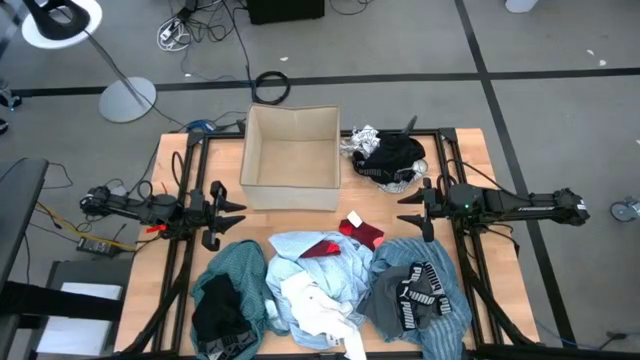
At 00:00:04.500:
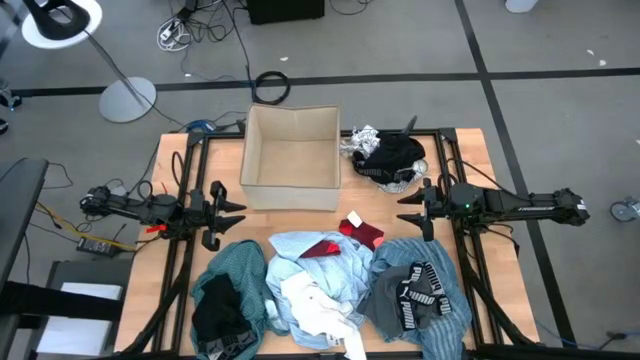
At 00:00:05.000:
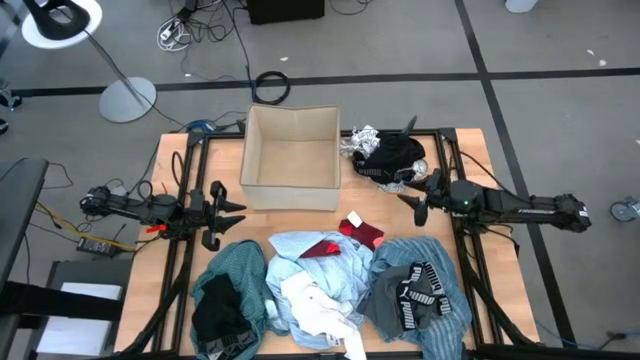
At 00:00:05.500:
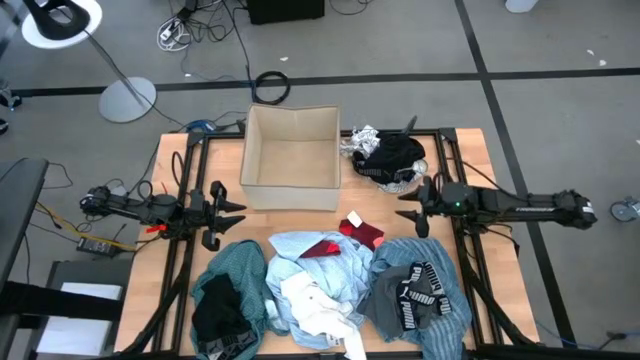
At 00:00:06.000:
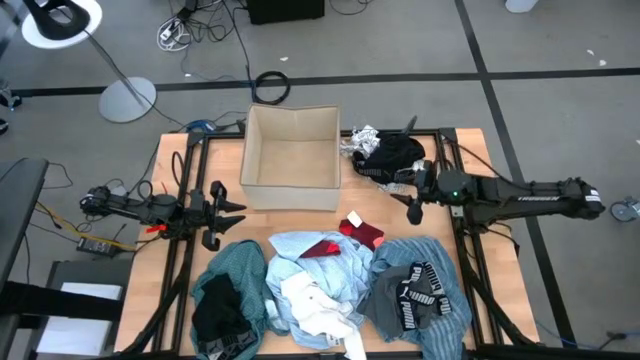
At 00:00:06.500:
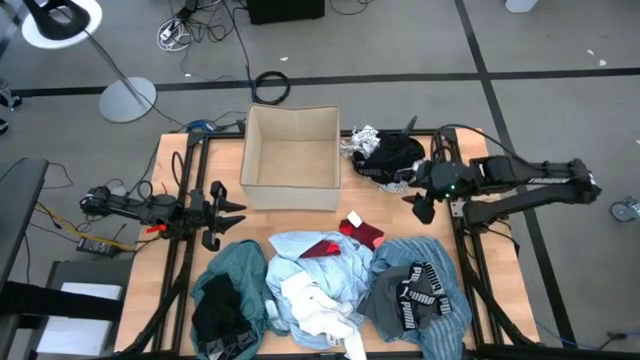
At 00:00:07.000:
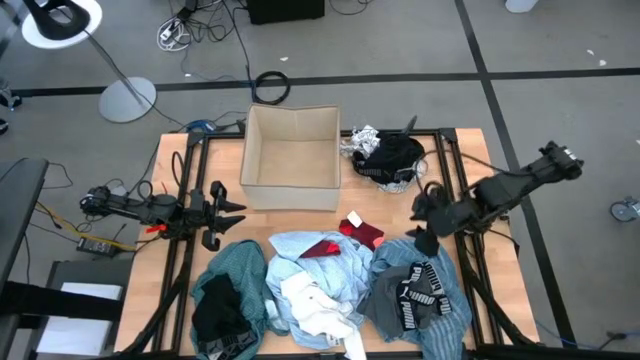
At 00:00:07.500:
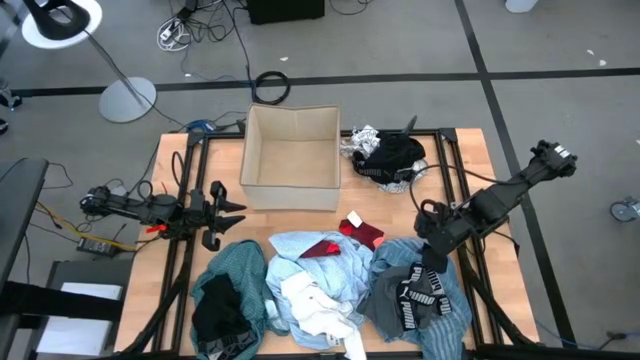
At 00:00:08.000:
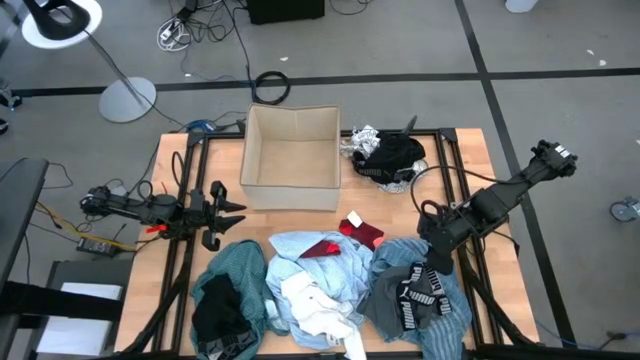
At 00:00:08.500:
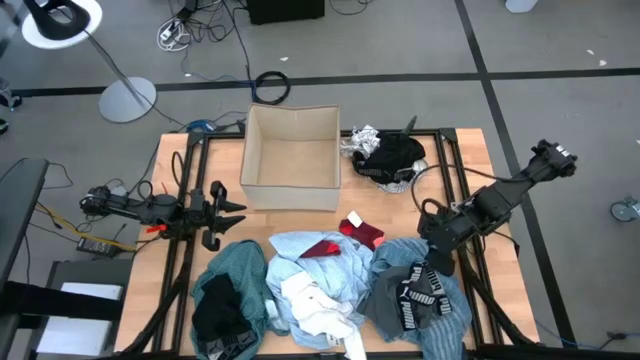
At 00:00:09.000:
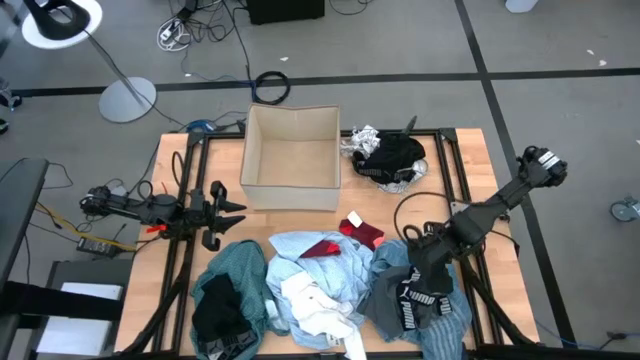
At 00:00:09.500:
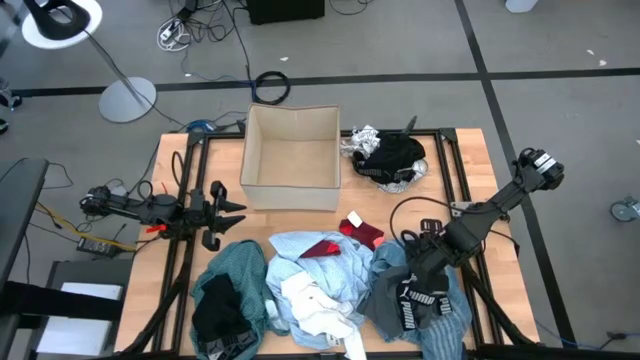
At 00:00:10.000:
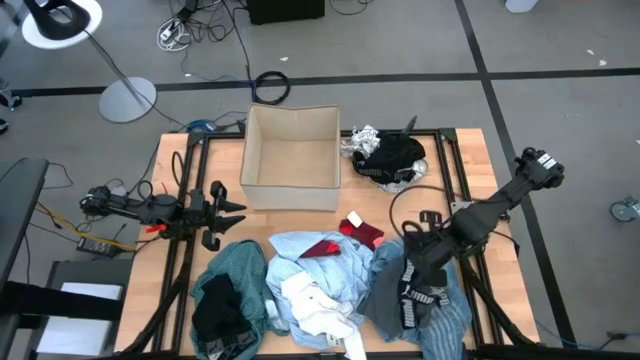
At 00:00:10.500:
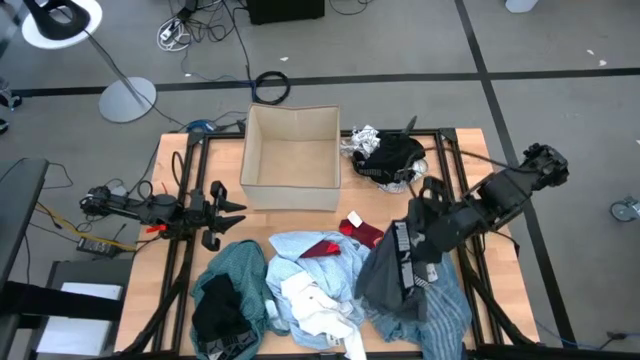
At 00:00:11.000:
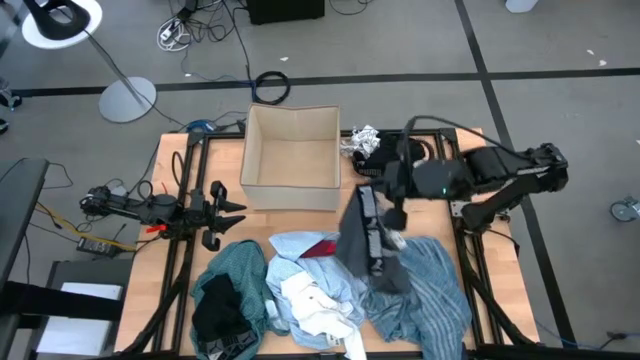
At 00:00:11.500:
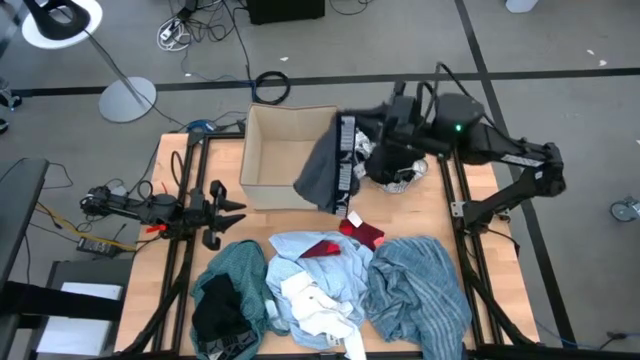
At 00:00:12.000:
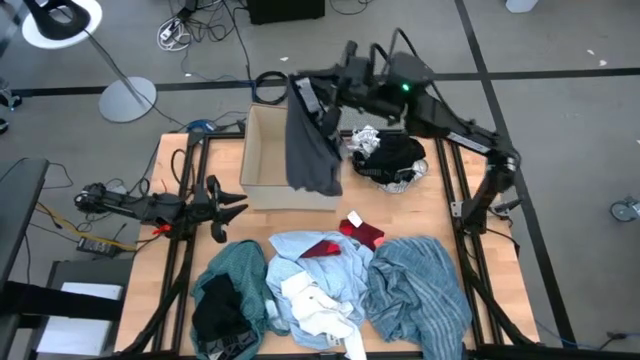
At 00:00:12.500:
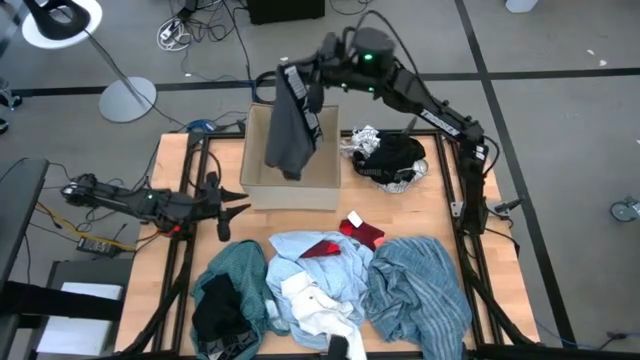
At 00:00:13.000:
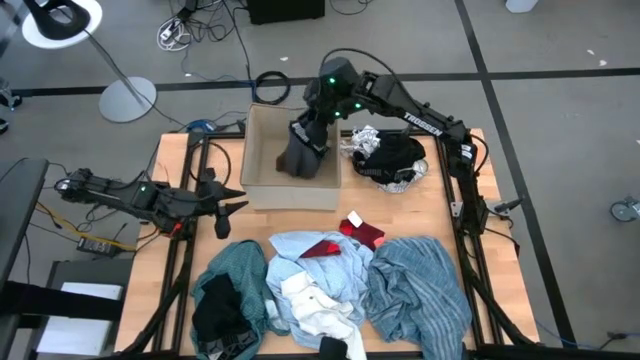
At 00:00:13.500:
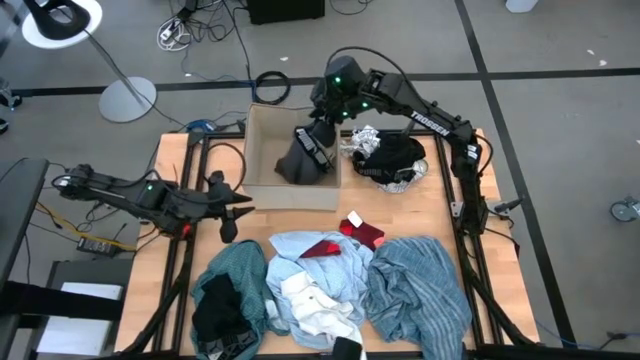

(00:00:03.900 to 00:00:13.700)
Task: Sort clothes
Put the gray boxers into the laundry organizer

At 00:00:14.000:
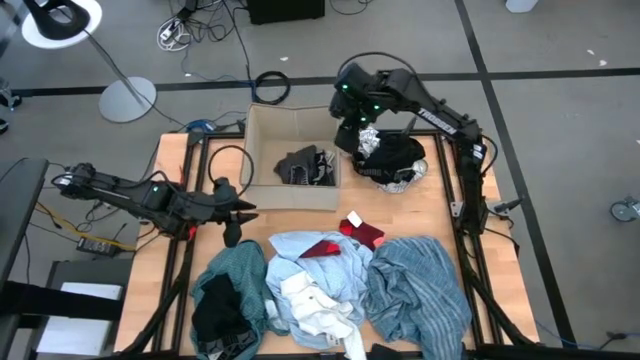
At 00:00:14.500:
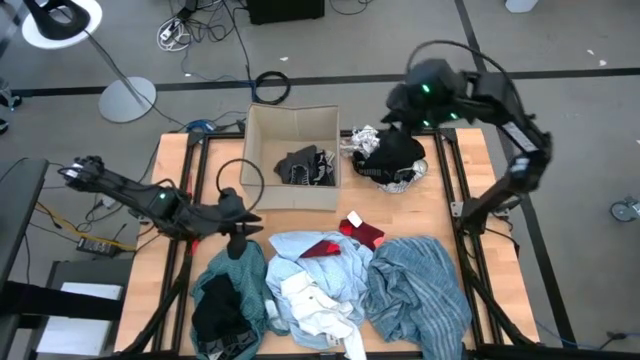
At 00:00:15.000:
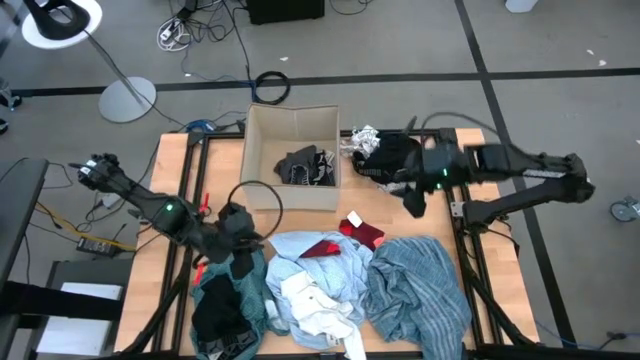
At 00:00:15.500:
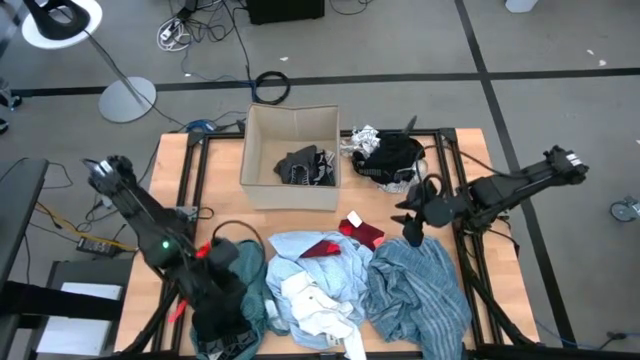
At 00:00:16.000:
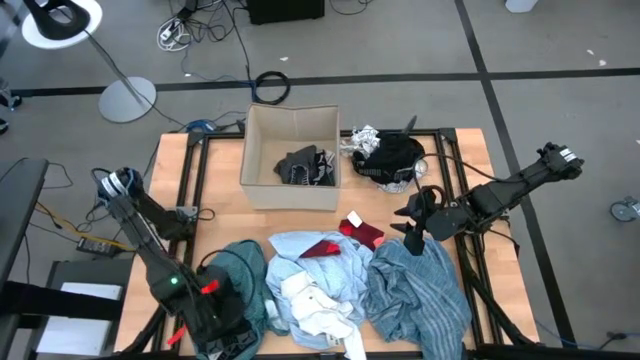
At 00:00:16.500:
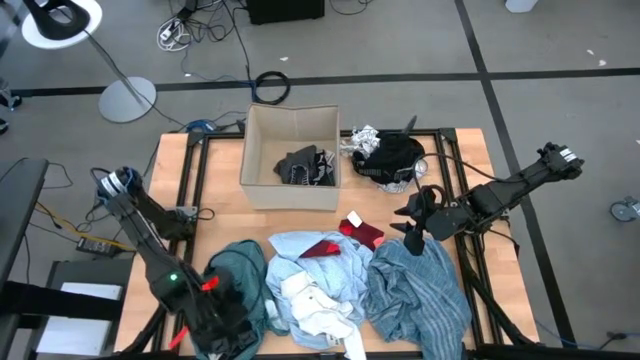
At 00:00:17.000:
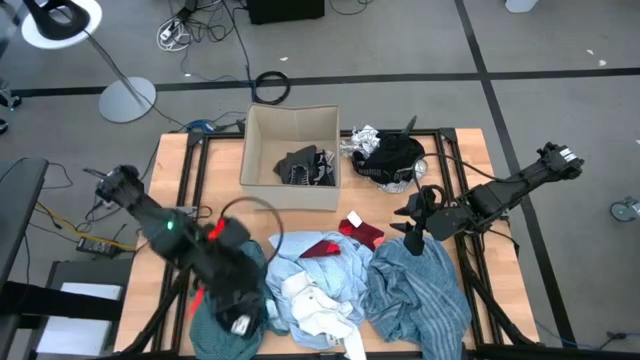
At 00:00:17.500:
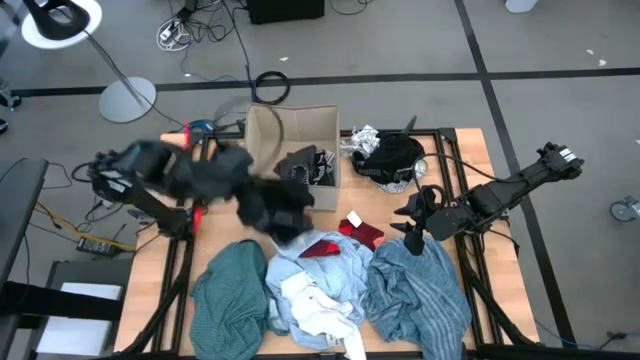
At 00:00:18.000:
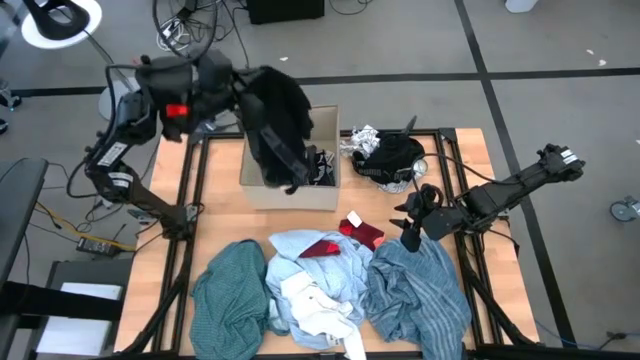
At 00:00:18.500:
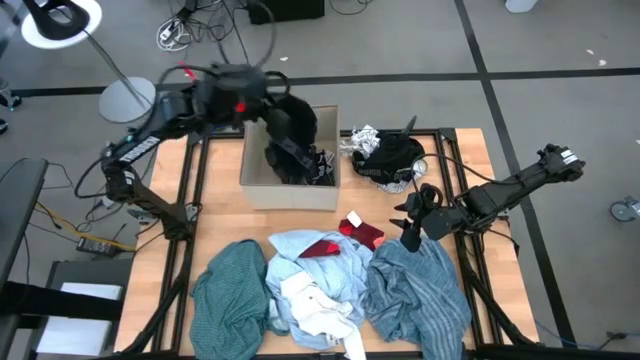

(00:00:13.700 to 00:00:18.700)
Put the bottom black boxers into the laundry organizer

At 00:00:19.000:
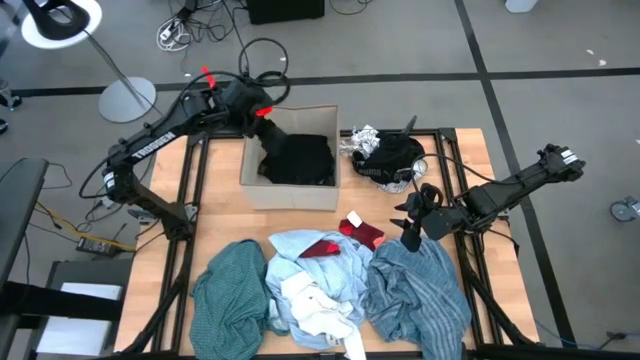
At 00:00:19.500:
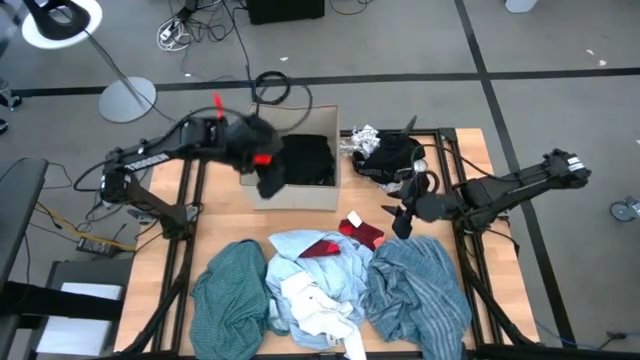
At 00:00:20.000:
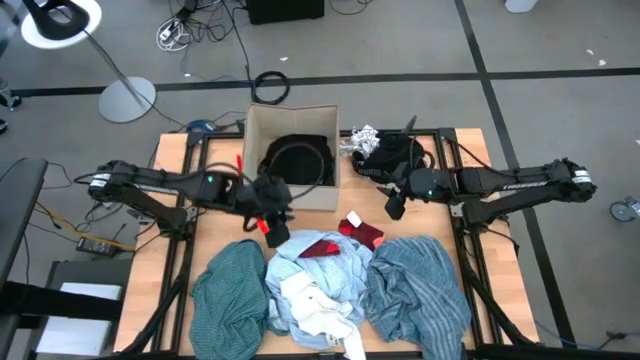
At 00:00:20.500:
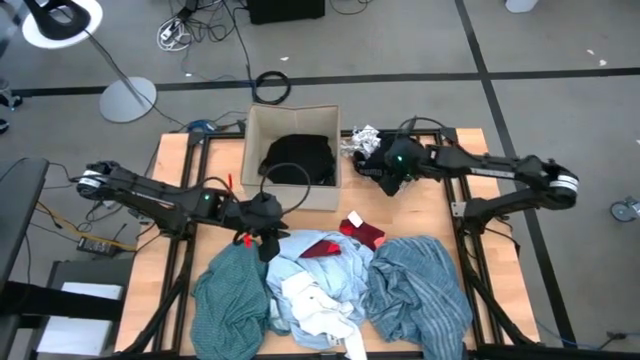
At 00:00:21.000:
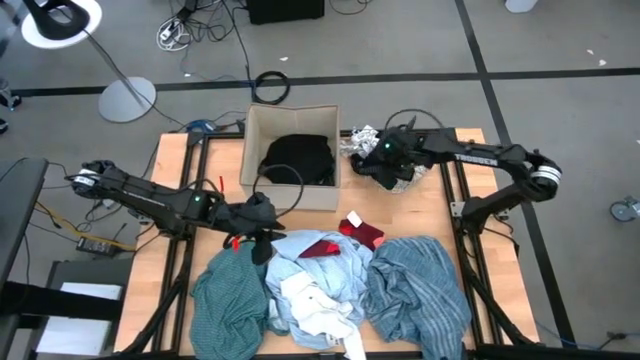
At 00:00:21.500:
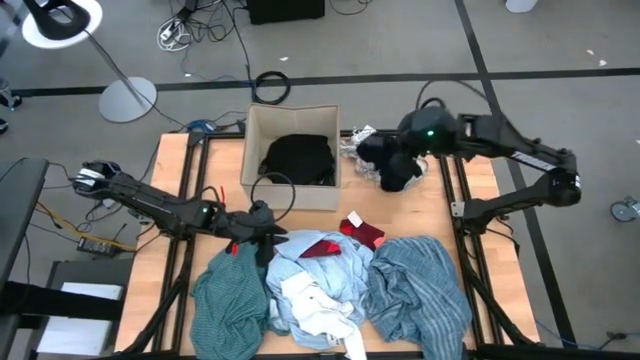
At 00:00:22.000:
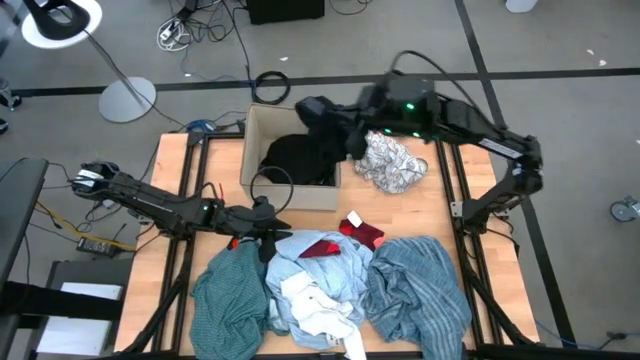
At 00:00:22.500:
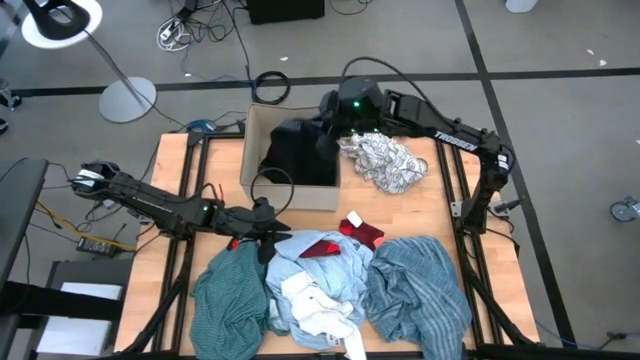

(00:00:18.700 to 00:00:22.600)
Put the black boxers into the laundry organizer

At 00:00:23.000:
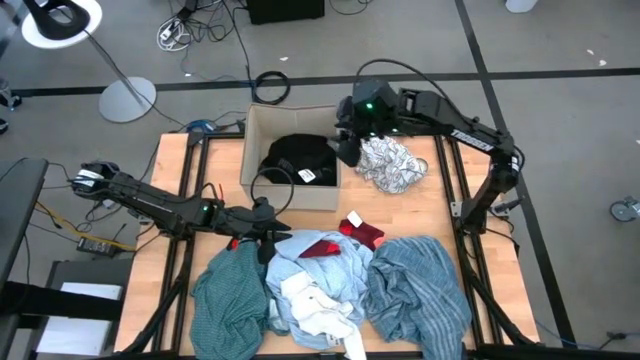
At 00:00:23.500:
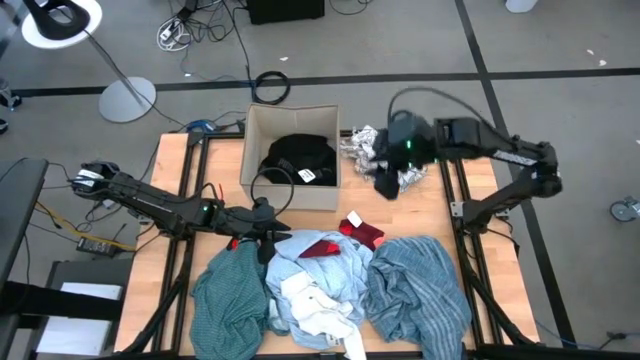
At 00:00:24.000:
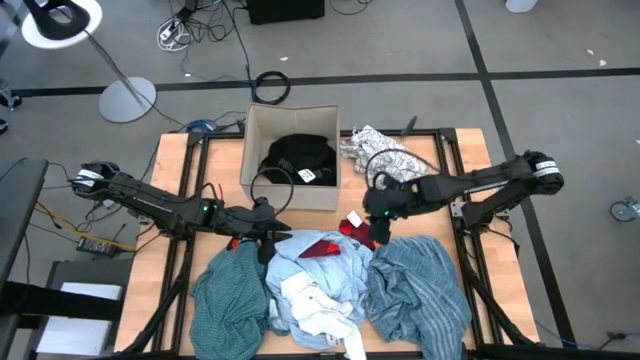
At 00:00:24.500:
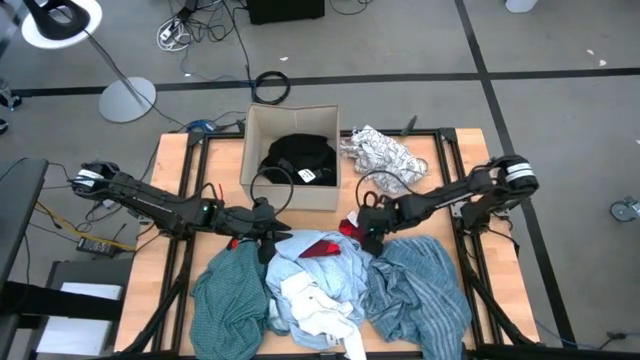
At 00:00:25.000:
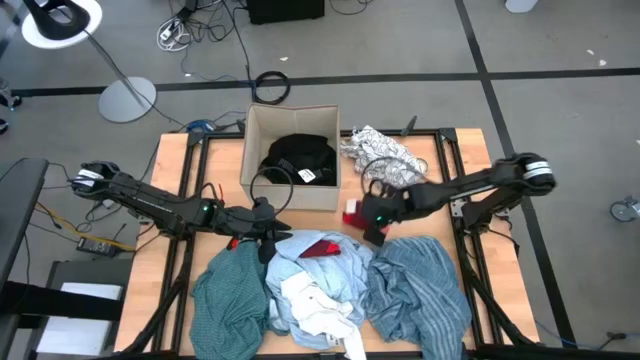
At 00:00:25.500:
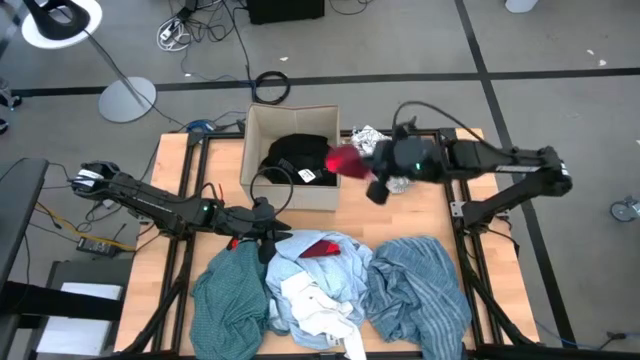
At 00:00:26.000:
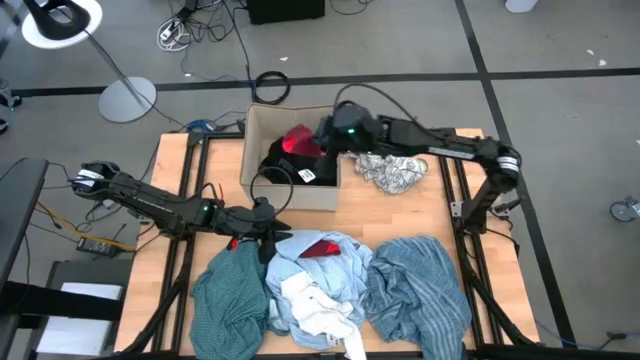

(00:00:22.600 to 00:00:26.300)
Put the right red sock into the laundry organizer
